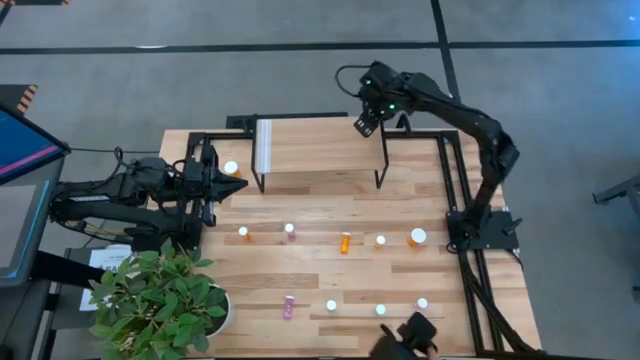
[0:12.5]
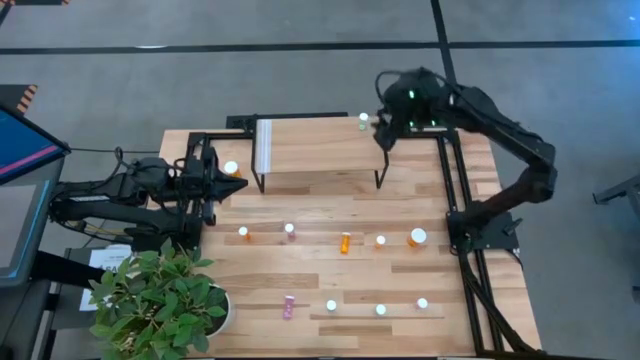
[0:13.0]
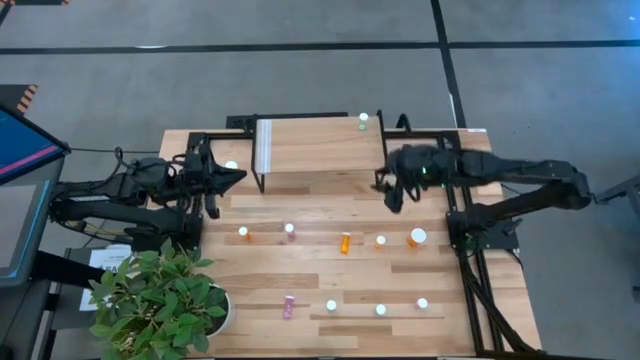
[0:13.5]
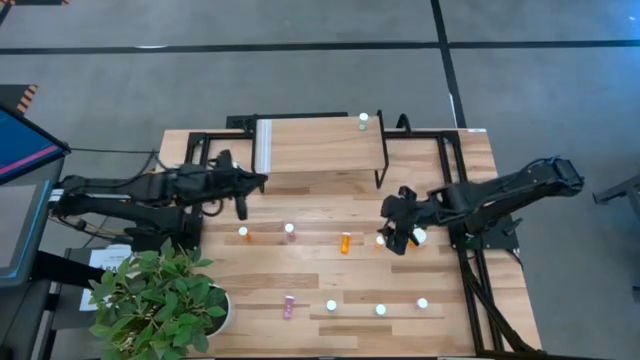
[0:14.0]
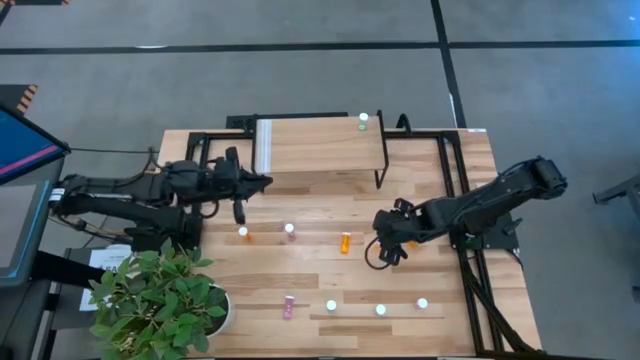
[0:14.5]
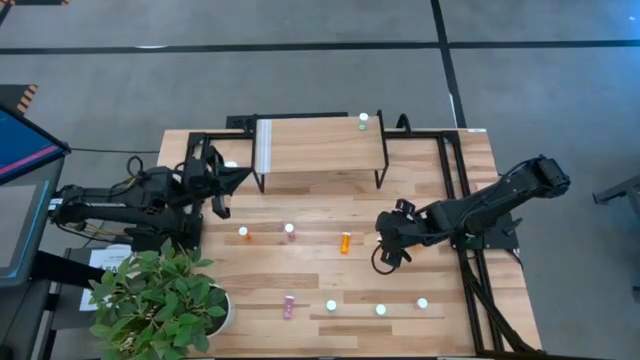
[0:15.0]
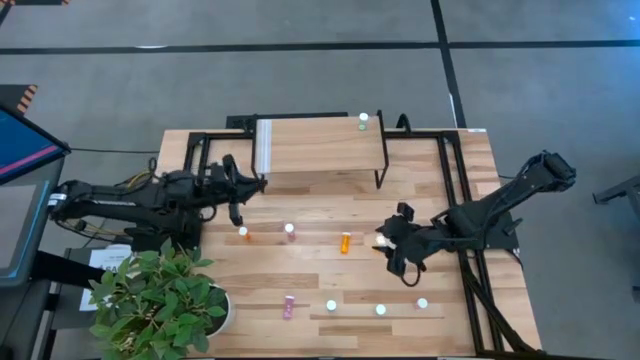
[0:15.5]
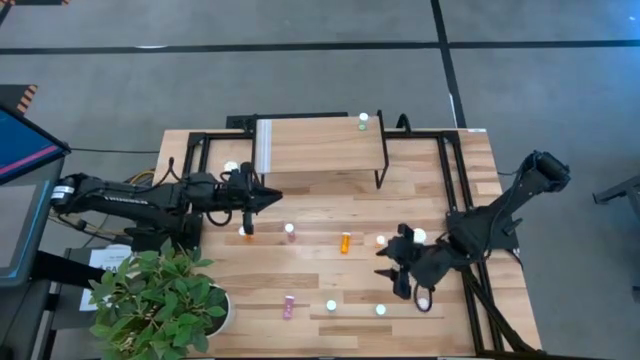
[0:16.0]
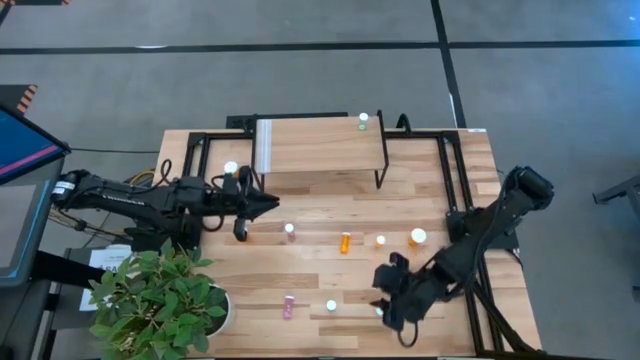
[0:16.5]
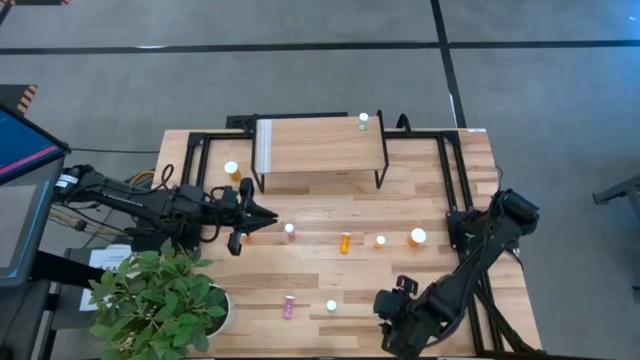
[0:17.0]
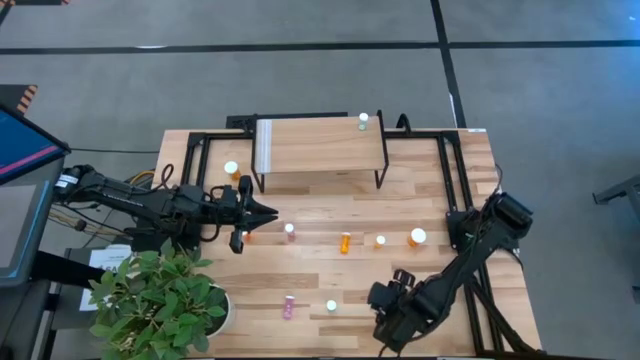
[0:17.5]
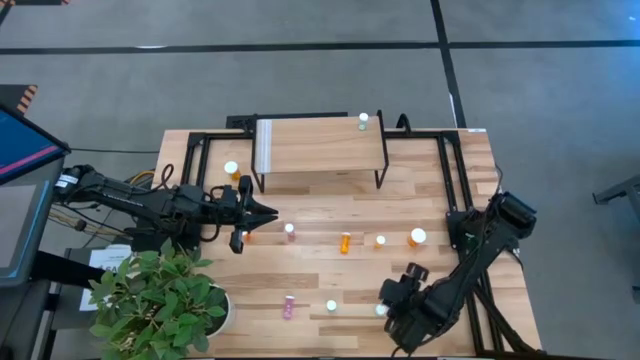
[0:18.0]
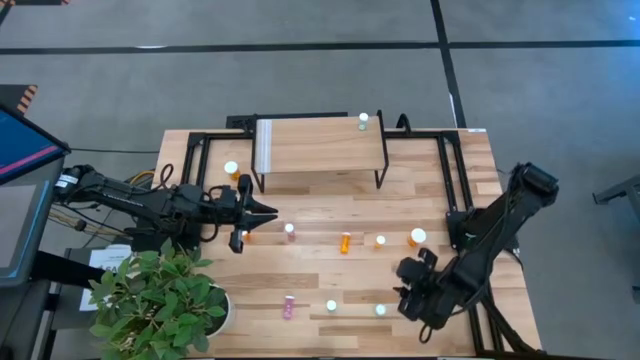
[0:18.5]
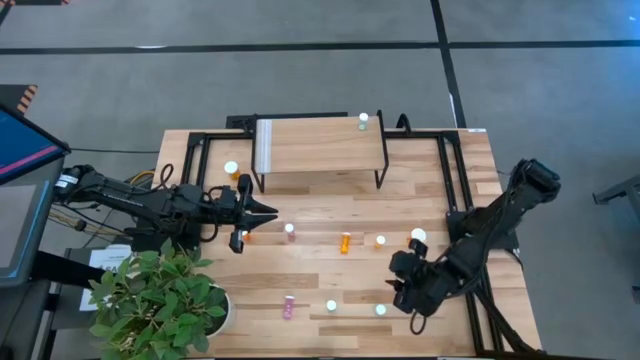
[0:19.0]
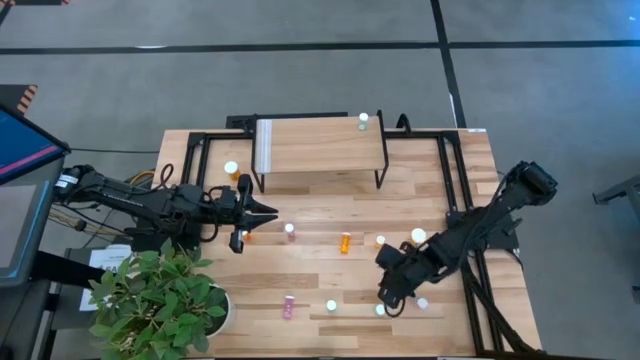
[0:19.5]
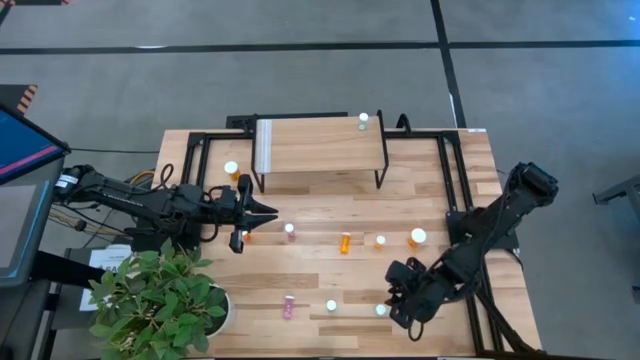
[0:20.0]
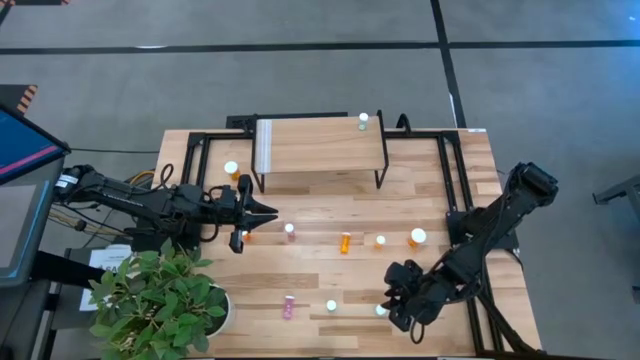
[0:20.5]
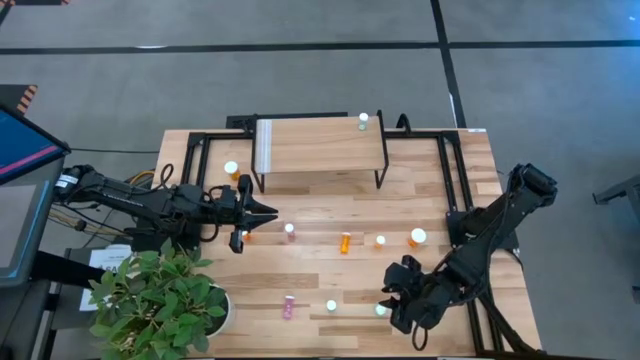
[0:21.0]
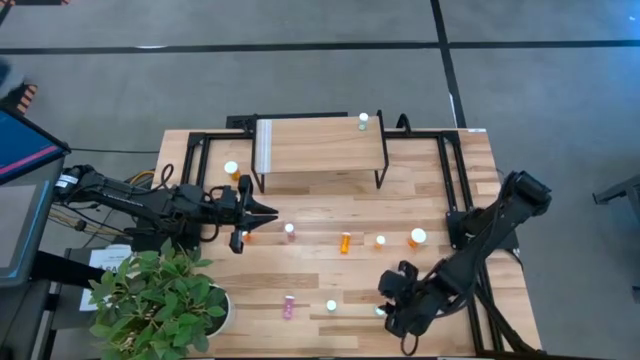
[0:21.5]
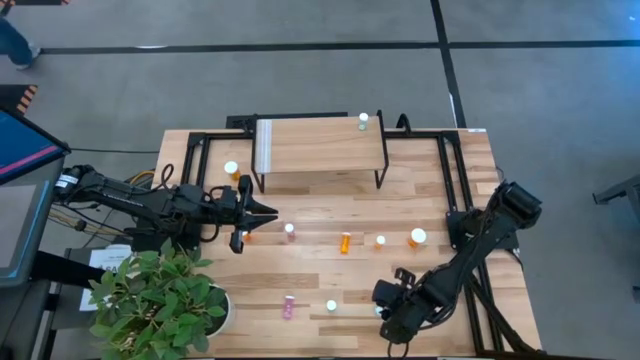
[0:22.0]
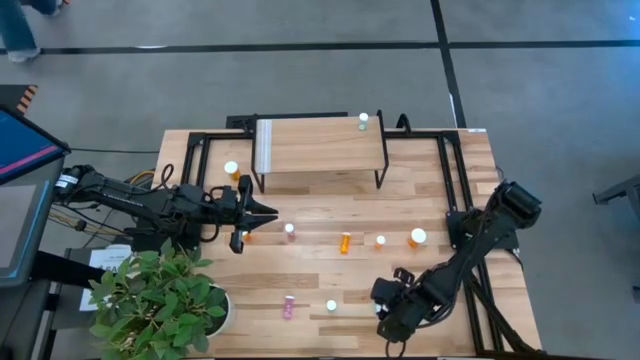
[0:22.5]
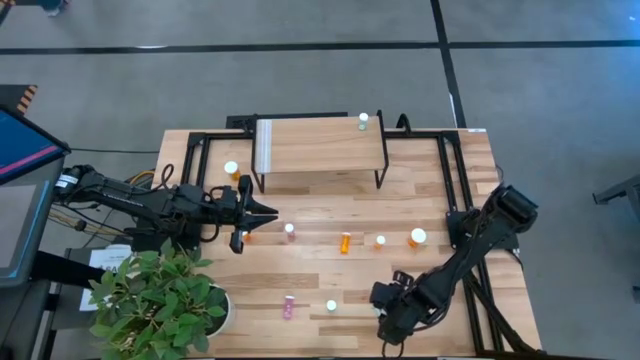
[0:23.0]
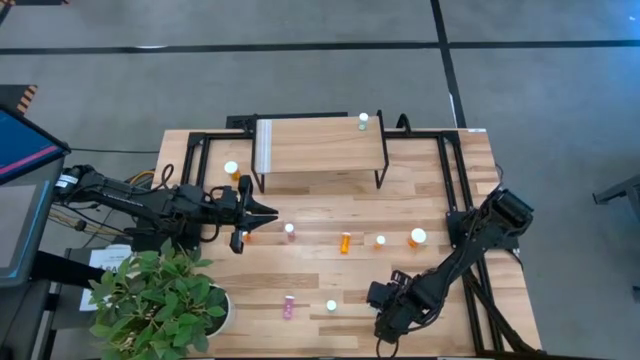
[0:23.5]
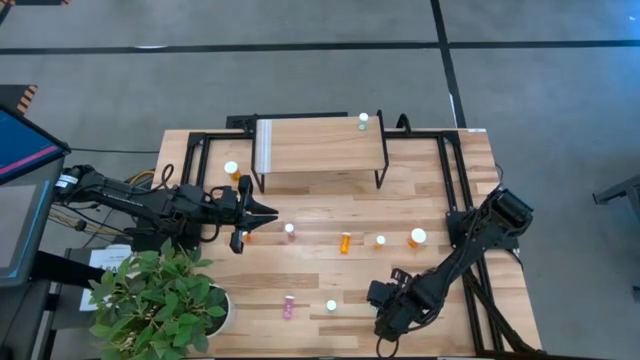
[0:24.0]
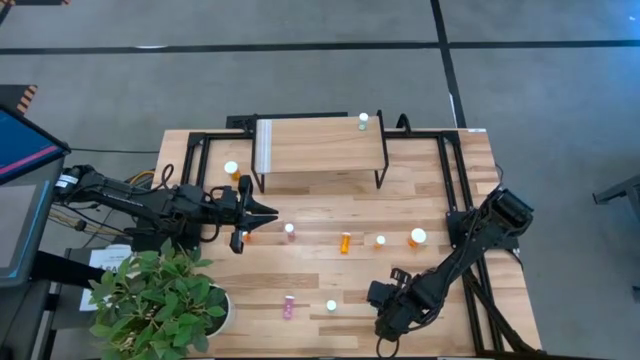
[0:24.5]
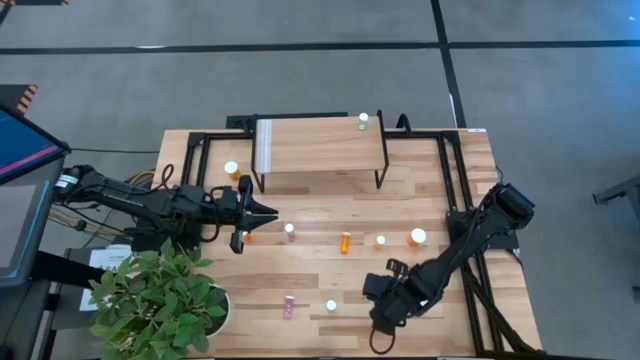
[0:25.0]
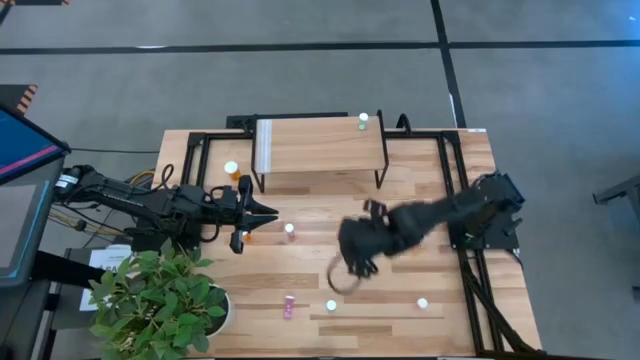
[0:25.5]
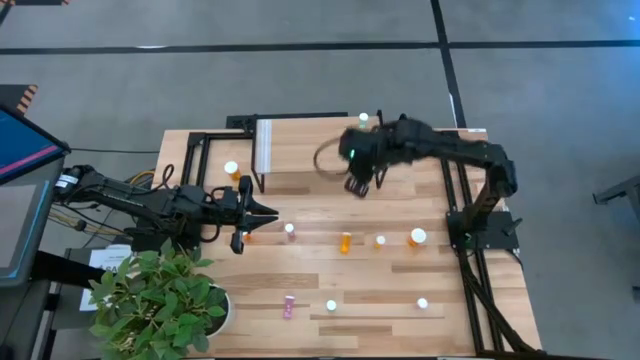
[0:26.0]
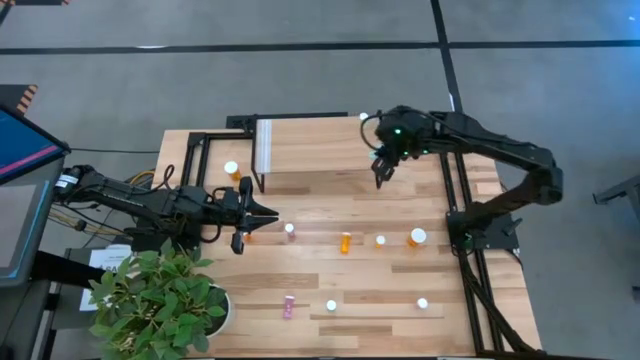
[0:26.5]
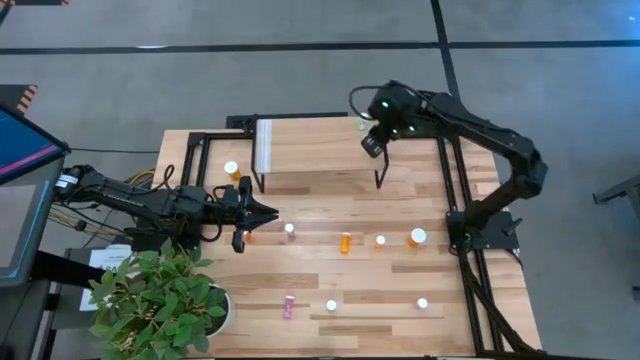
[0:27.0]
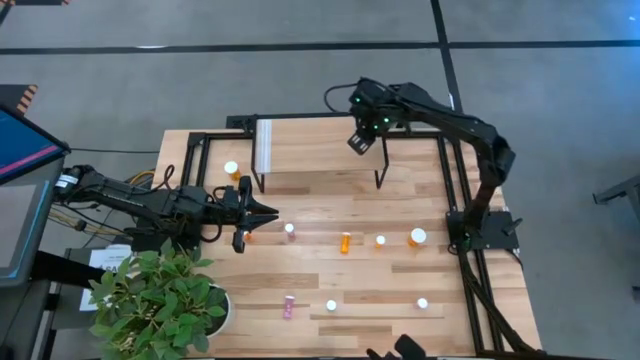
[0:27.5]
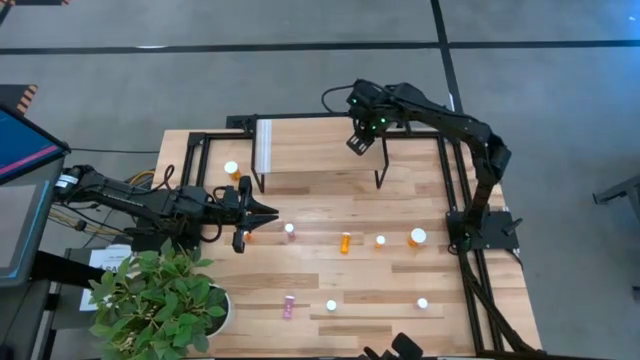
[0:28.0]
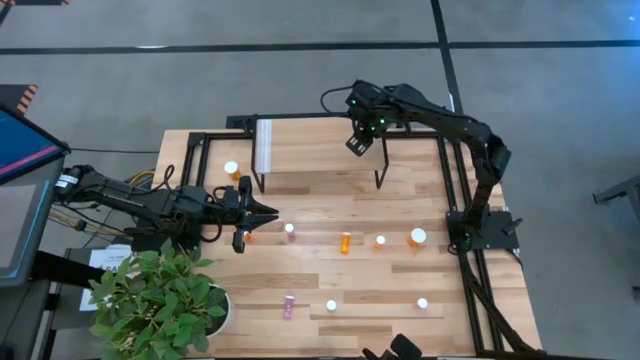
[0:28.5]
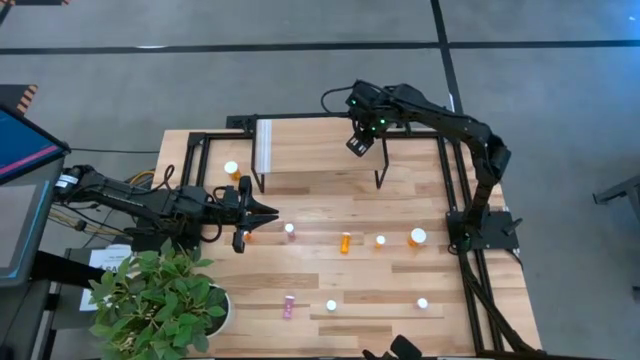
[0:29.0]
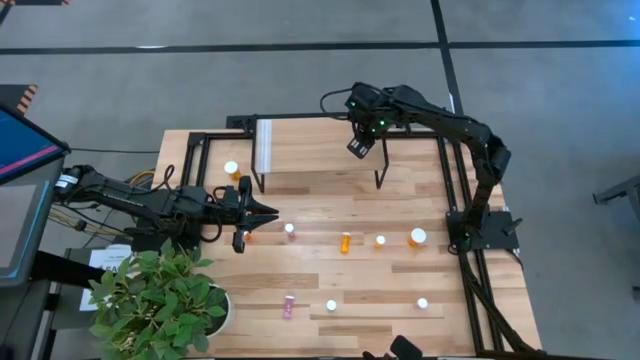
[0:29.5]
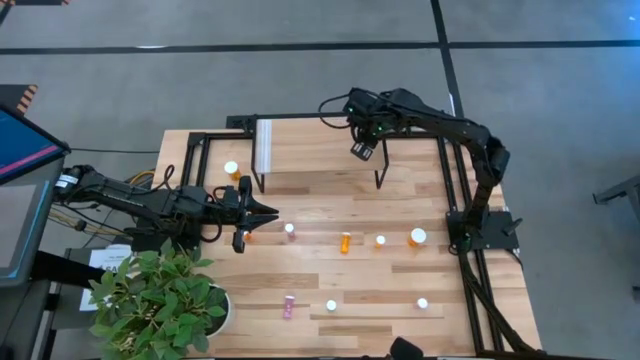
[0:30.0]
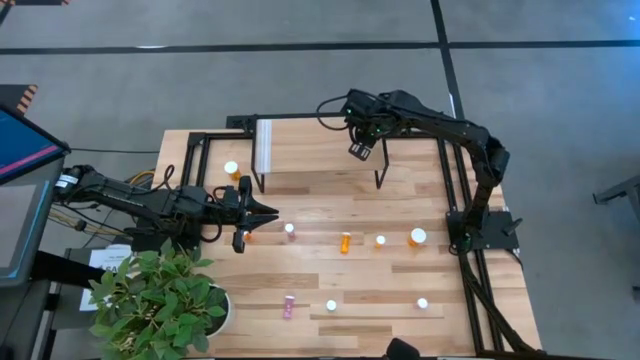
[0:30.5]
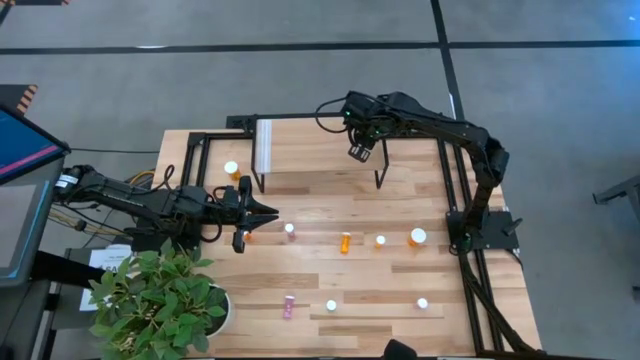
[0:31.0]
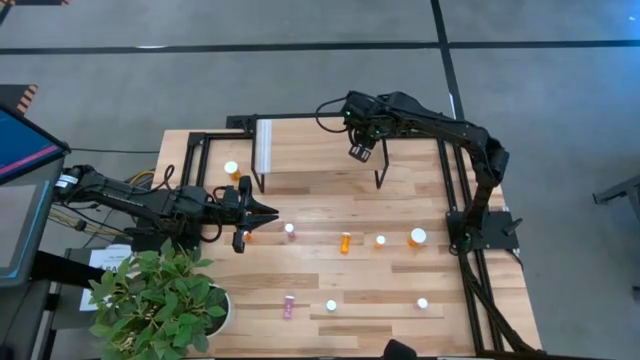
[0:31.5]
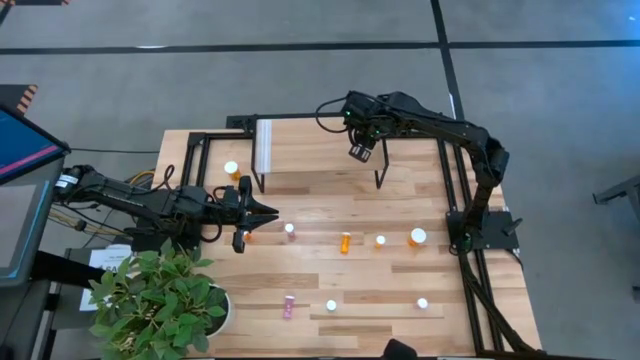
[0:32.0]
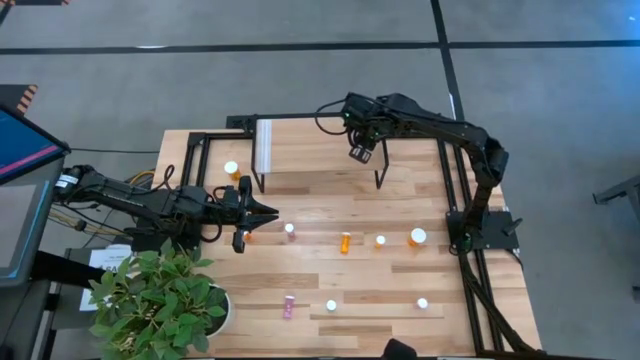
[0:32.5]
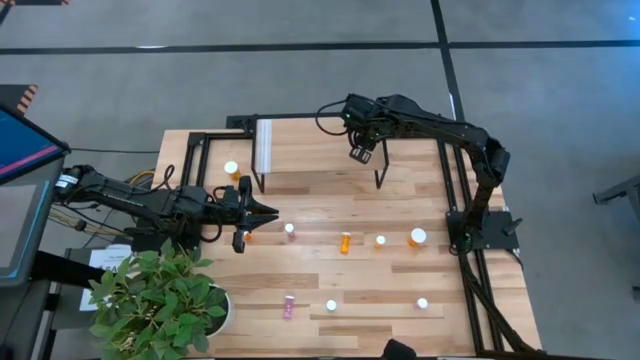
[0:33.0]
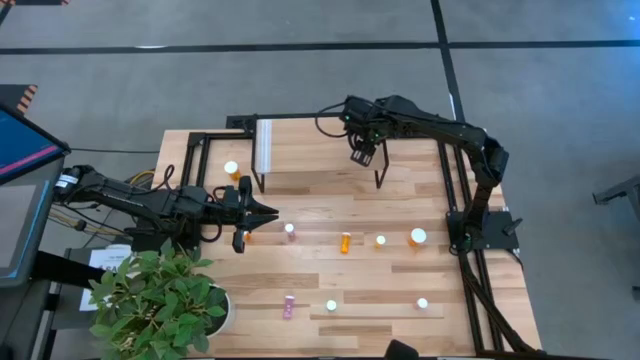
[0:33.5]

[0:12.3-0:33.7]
Task: Pick and place medicine bottles onto shelf by color
Align the right small green pill bottle with the other small green pill bottle on the shelf
